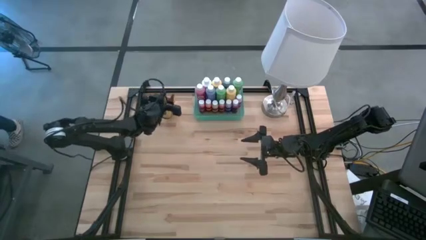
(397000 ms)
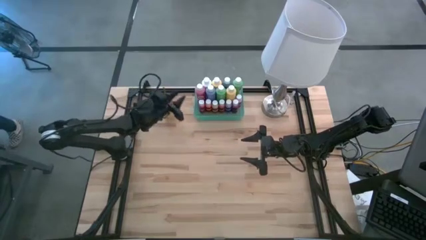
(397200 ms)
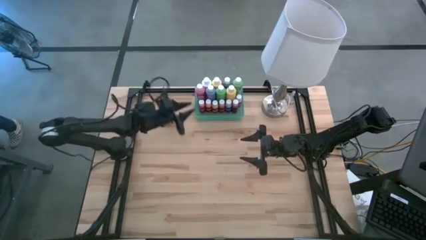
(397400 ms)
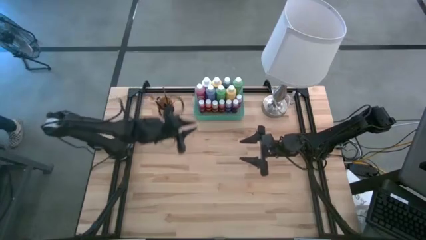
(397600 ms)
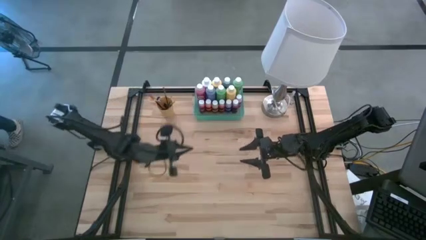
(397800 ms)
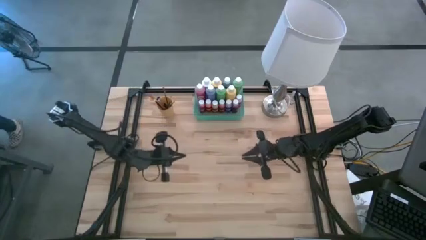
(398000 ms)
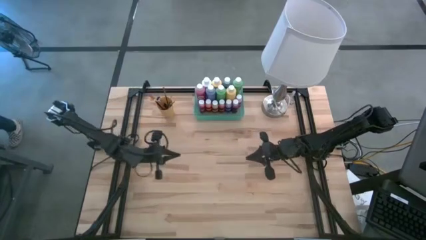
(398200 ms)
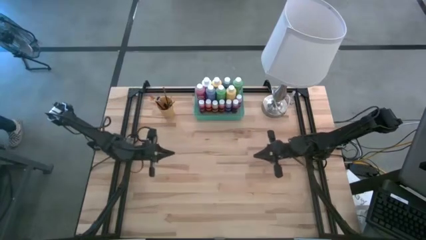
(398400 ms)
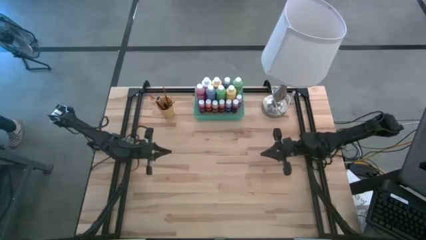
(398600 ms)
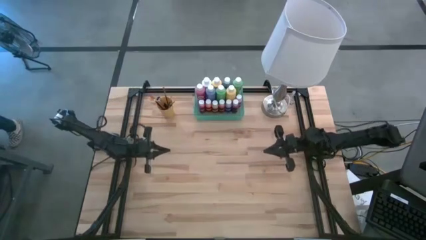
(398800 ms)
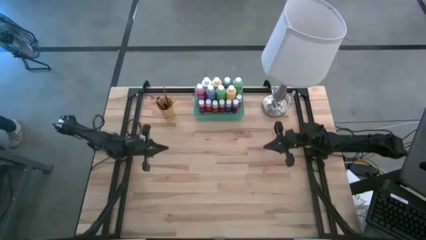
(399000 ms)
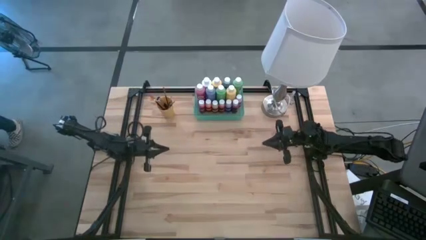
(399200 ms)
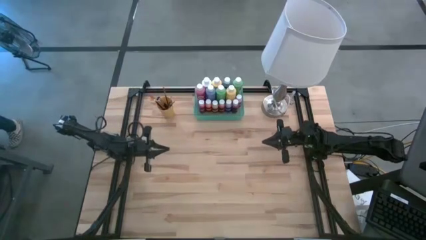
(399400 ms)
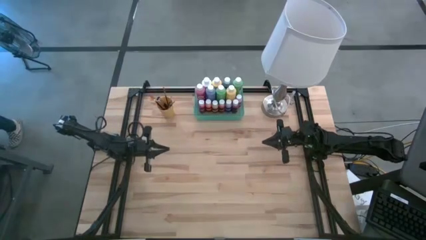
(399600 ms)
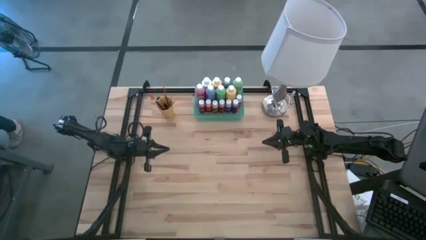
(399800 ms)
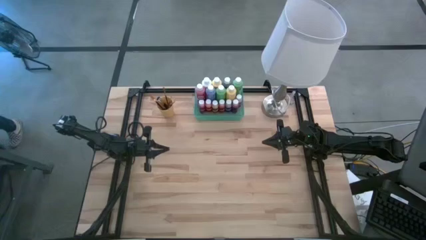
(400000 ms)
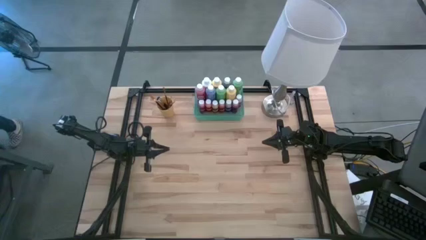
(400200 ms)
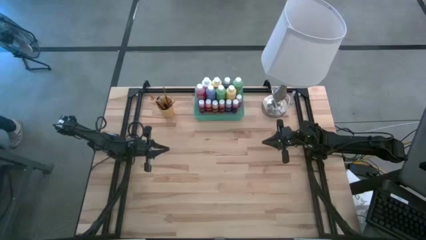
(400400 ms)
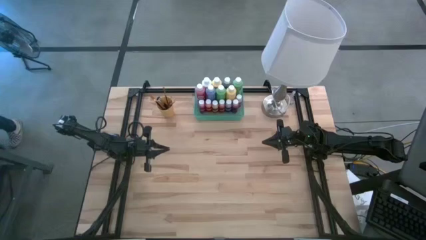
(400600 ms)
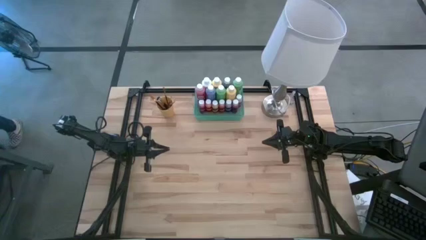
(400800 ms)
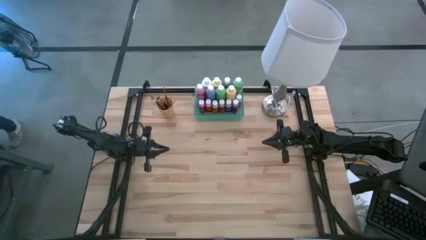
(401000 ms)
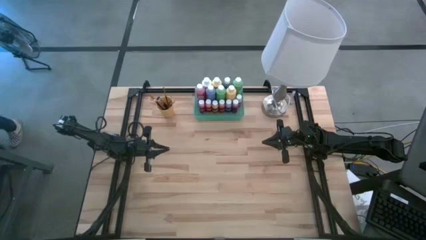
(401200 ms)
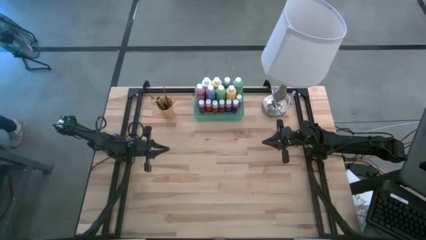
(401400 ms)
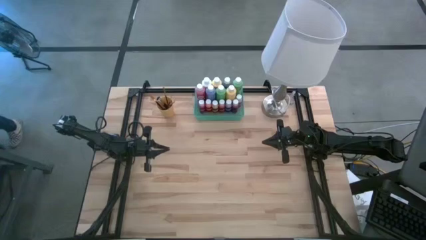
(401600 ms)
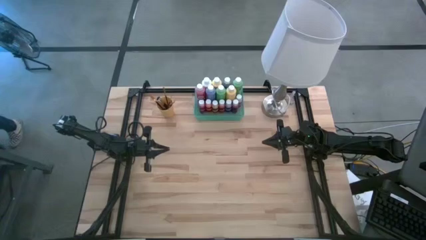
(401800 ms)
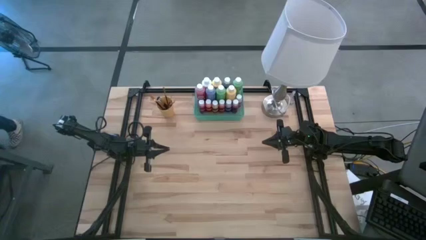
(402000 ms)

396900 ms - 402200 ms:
Task: Pick & Place Paint Supplies
Return to Home Position

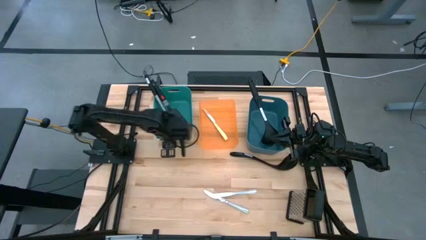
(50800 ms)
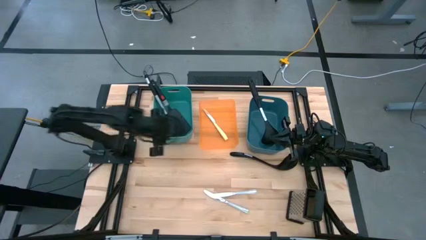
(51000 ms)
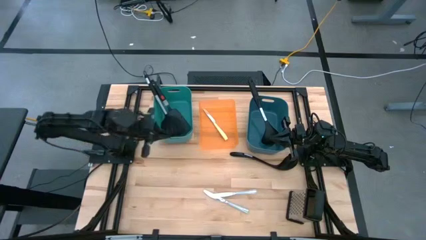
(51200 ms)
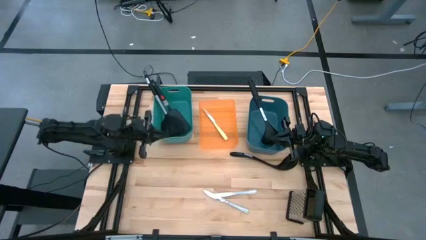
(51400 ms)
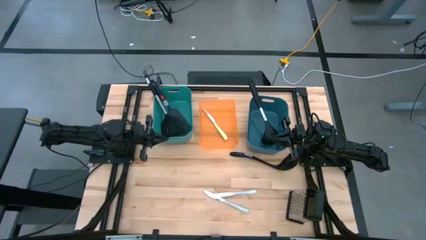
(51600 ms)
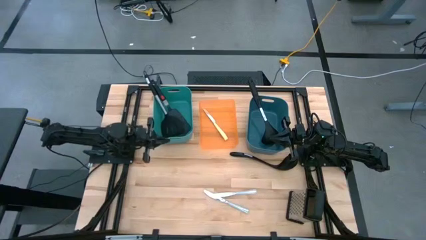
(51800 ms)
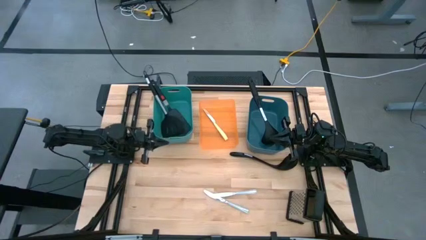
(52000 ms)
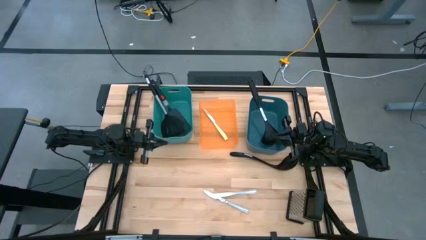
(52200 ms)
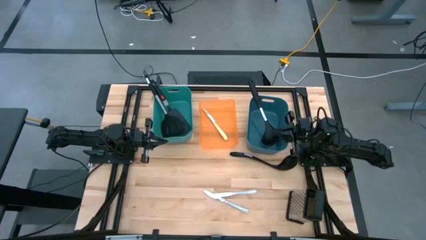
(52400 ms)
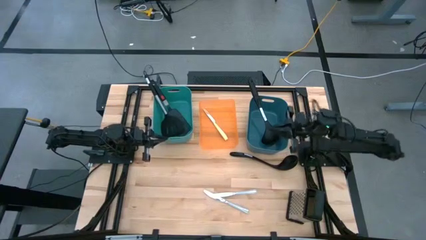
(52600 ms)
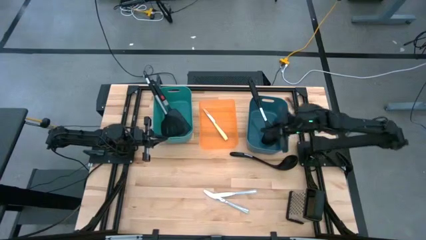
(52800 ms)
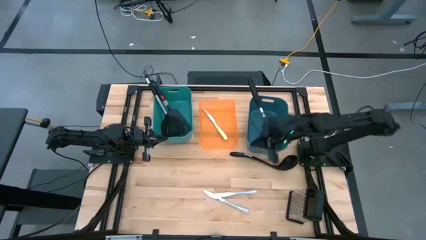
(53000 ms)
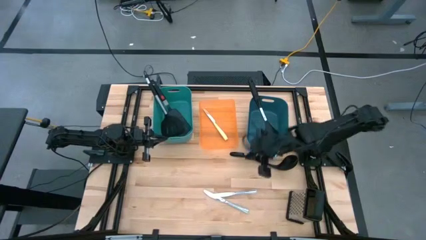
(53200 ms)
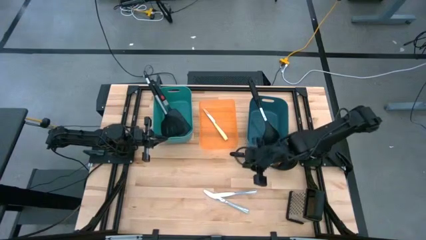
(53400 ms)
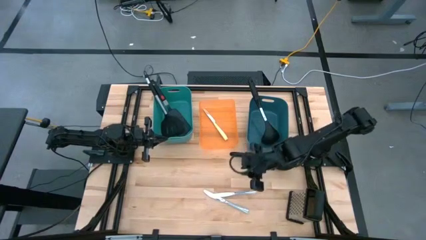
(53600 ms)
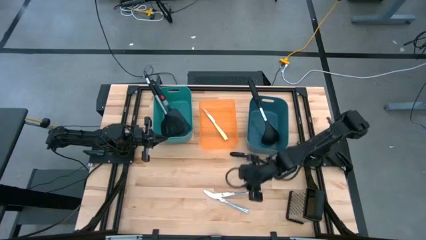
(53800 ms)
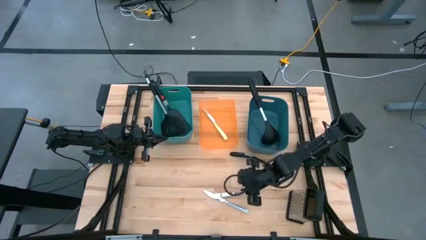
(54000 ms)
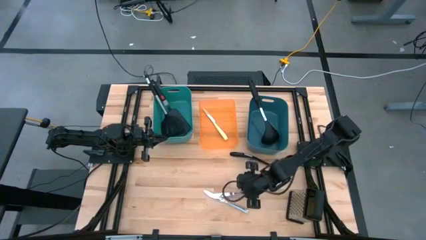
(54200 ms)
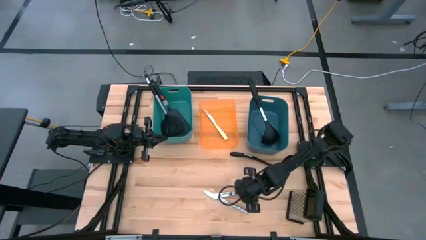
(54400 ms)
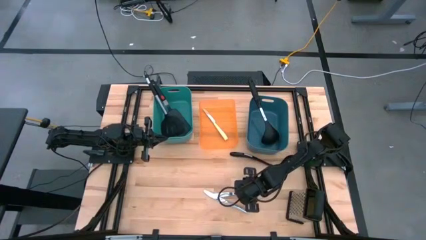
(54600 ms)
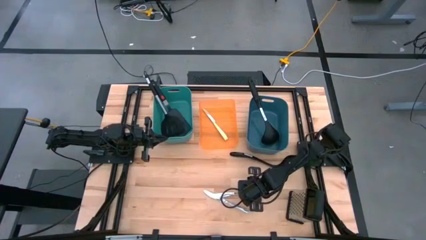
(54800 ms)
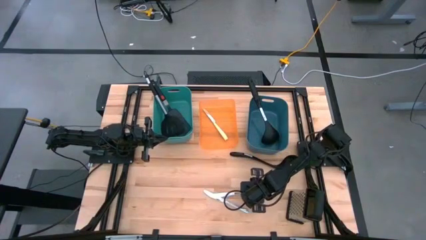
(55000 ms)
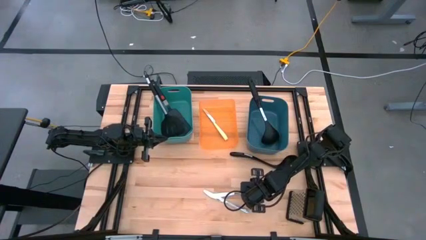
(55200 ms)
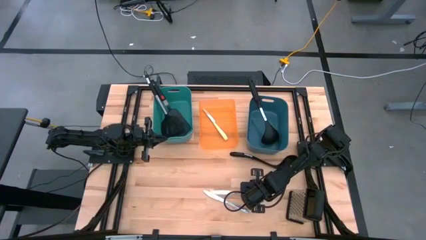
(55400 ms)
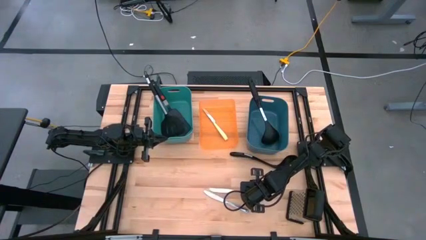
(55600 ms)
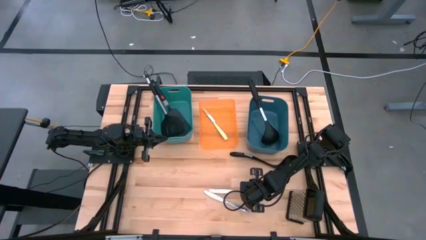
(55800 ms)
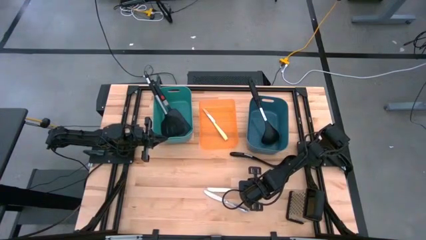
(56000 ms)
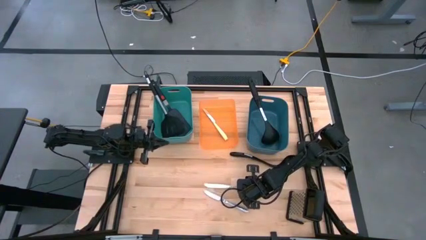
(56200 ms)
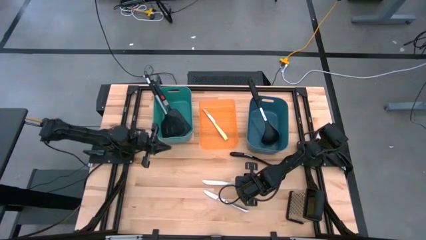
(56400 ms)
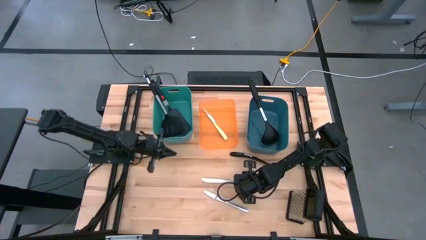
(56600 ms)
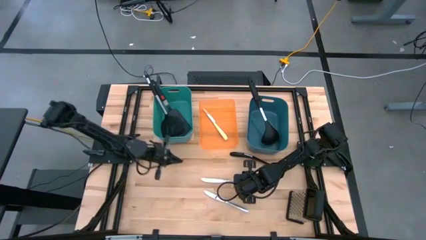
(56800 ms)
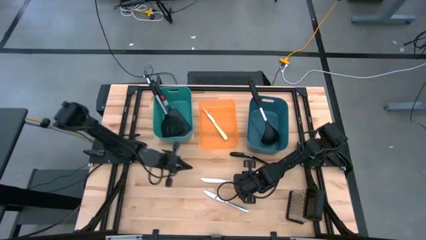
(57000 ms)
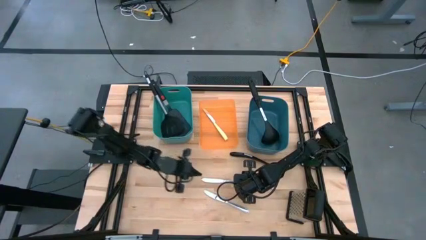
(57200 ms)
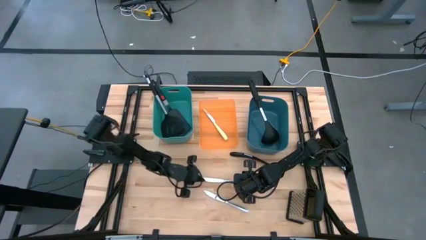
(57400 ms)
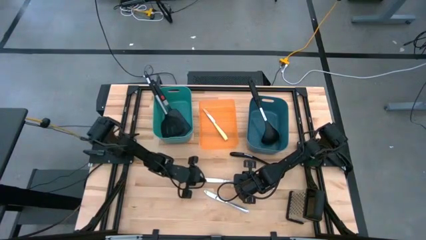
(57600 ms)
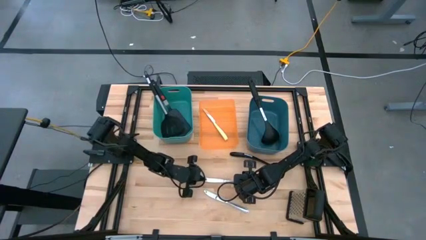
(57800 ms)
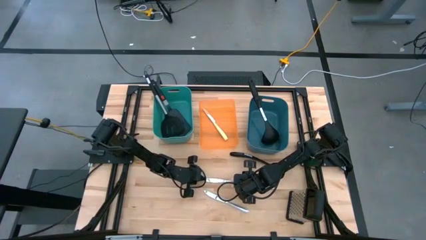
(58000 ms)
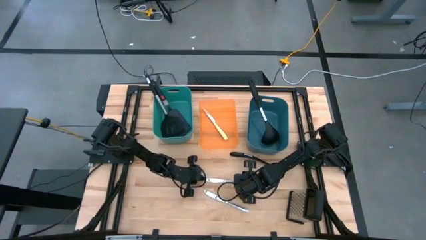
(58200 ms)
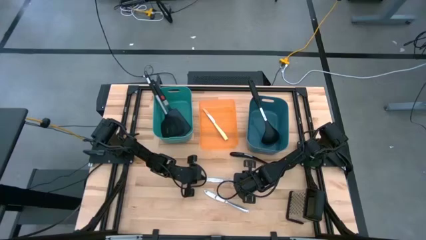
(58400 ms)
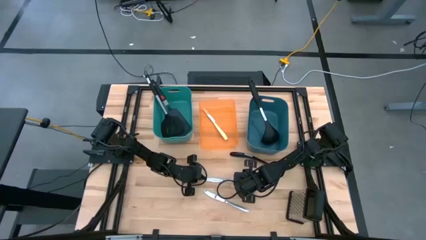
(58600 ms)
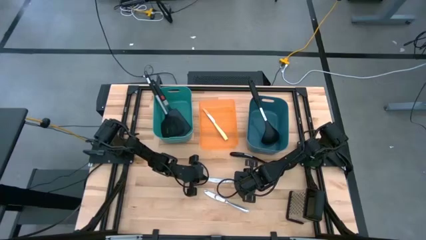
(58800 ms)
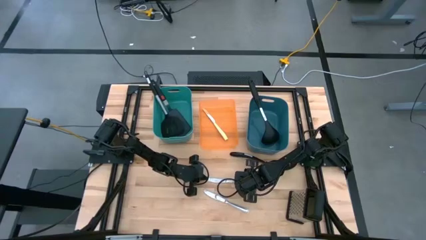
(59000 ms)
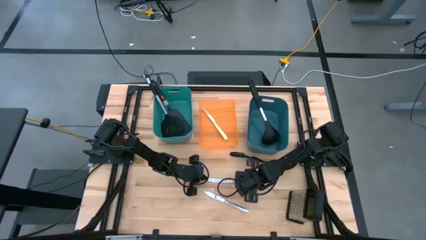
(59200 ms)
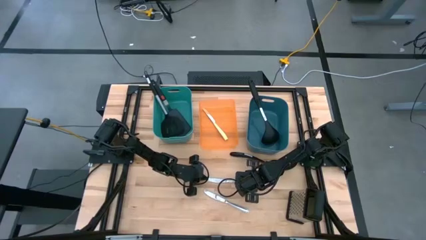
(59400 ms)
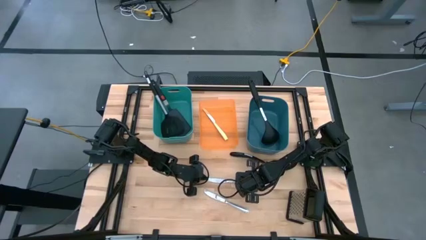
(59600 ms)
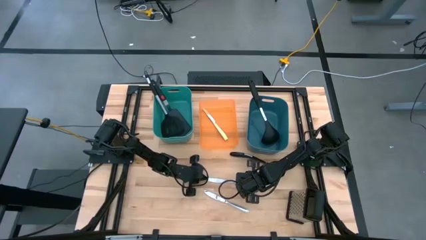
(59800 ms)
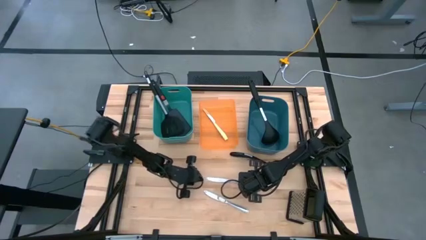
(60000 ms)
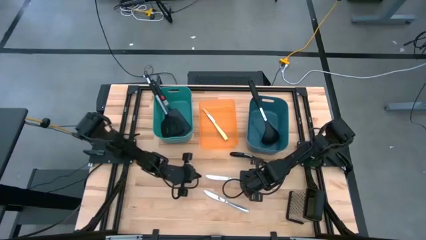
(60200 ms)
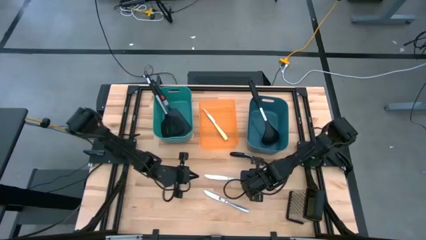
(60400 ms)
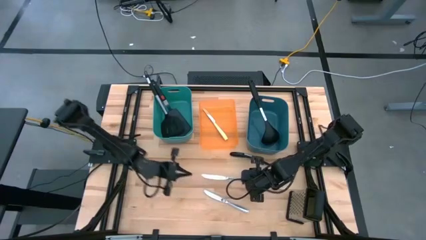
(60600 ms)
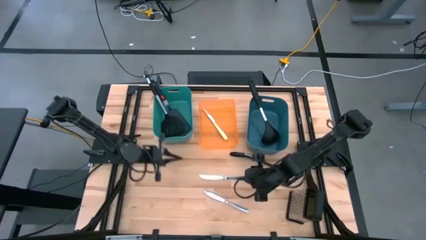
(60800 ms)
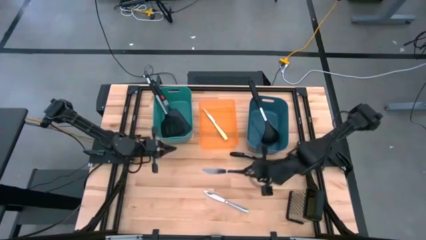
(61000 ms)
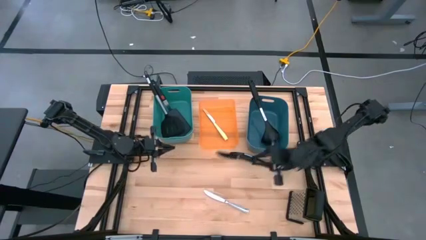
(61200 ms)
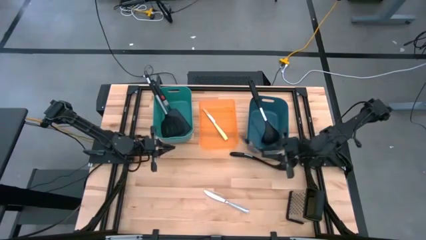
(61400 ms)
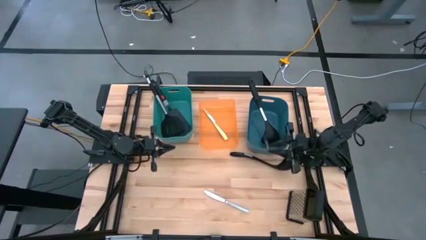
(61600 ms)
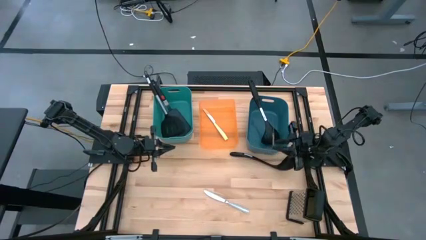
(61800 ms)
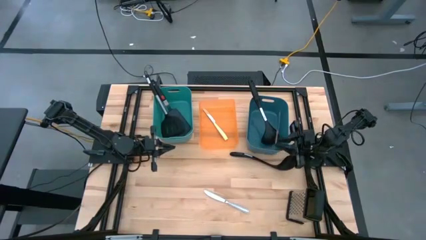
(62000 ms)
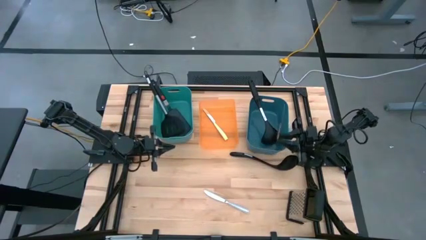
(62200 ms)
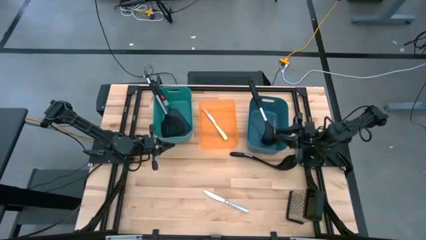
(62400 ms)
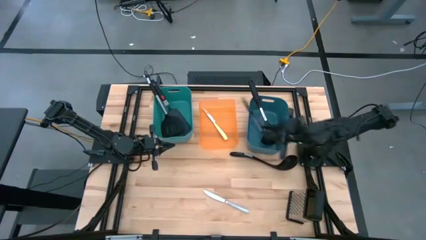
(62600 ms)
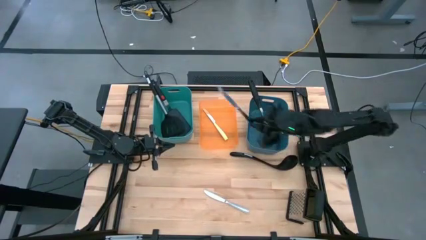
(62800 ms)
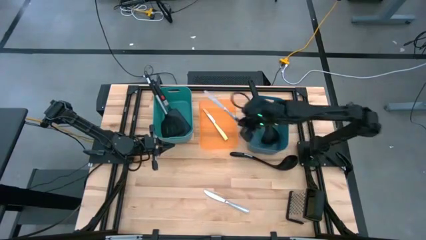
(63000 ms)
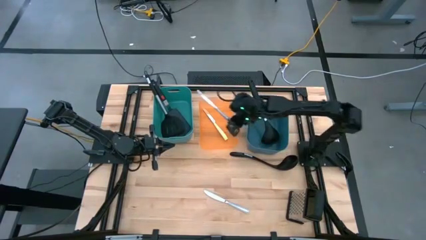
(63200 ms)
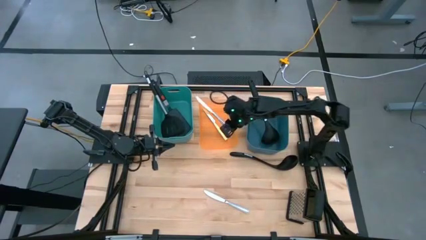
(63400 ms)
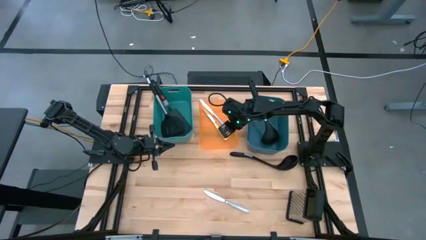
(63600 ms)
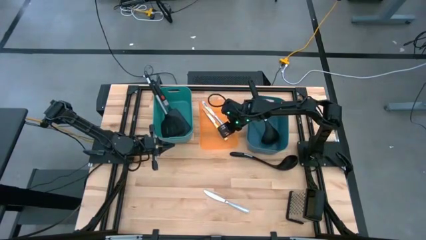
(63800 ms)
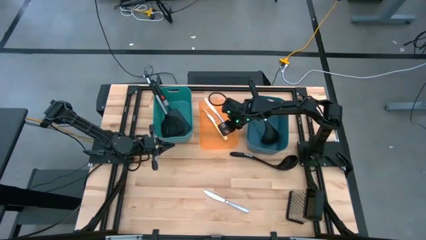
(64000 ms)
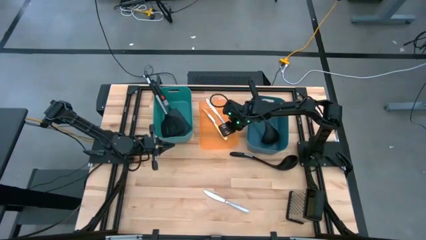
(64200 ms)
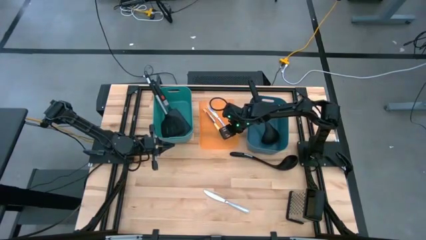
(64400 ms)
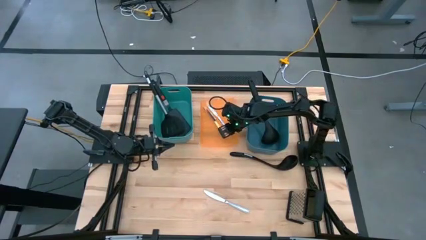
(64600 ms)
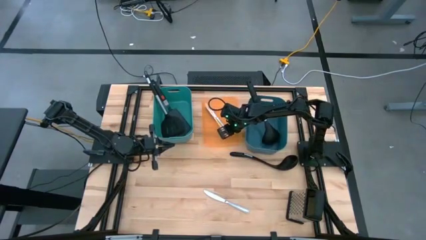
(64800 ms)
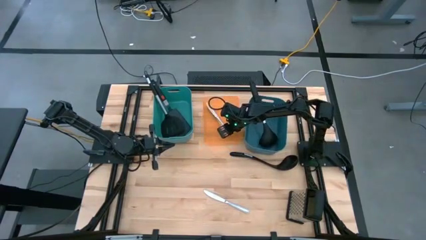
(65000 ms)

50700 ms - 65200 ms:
Task: Pick & Place Kitchen Items
Put the top silver knife into the orange bin
